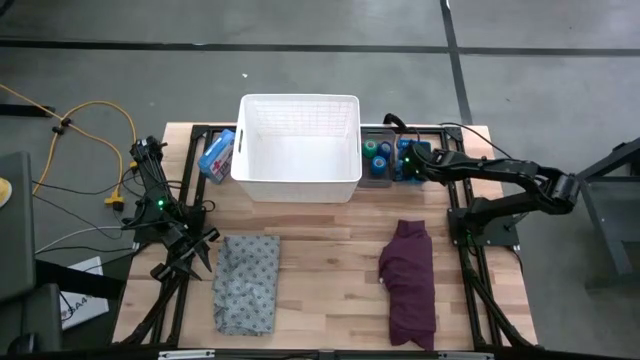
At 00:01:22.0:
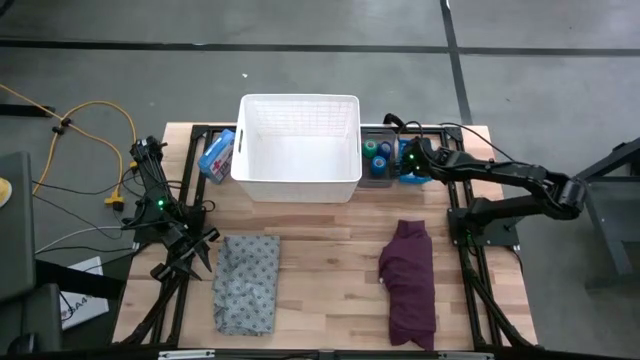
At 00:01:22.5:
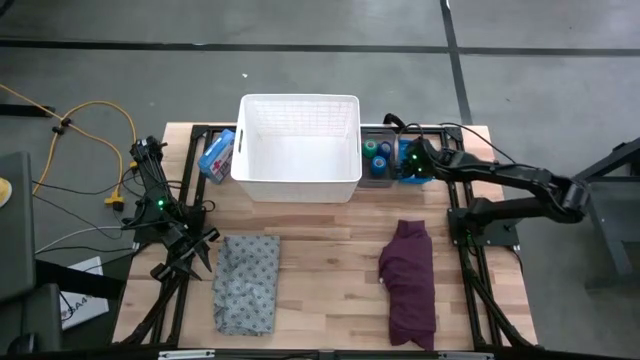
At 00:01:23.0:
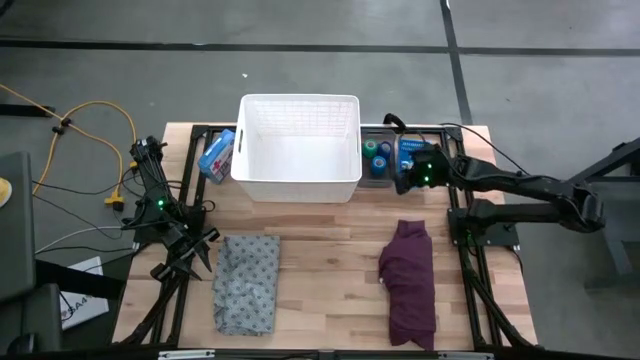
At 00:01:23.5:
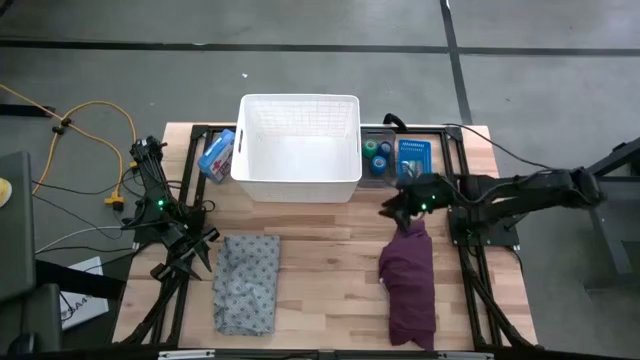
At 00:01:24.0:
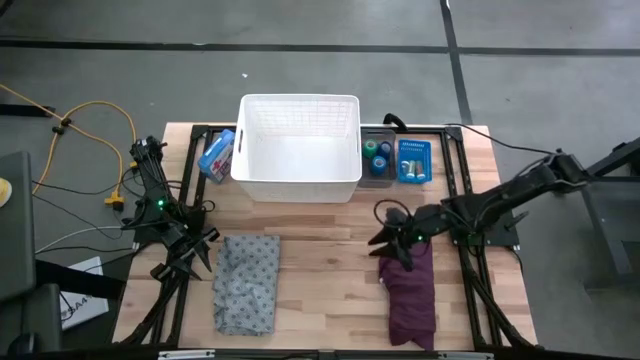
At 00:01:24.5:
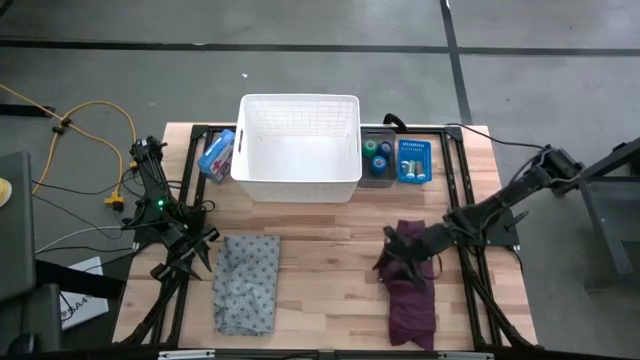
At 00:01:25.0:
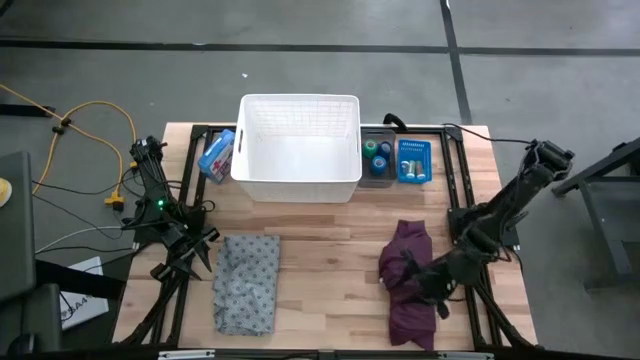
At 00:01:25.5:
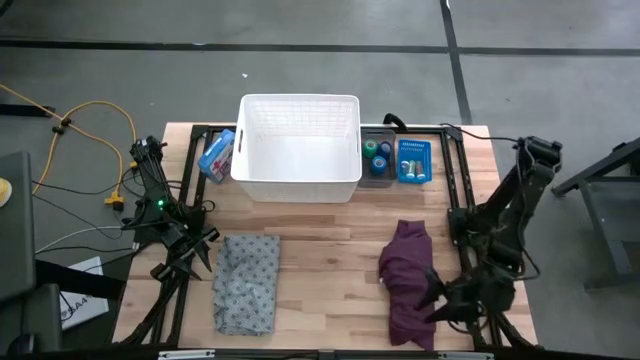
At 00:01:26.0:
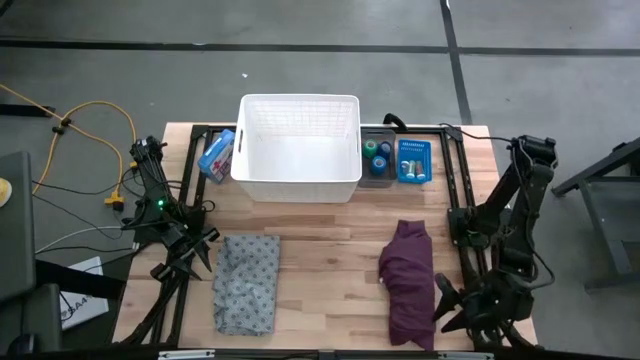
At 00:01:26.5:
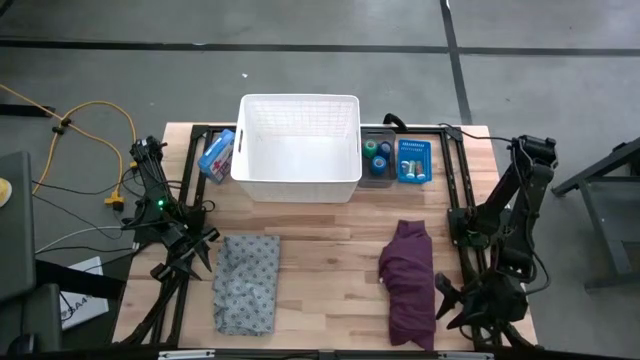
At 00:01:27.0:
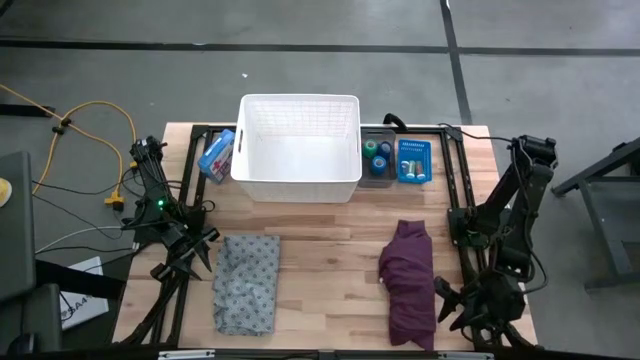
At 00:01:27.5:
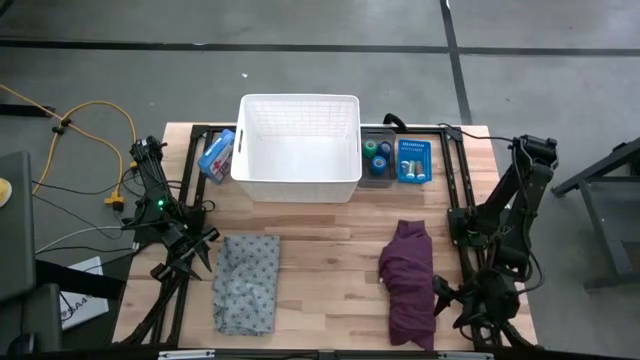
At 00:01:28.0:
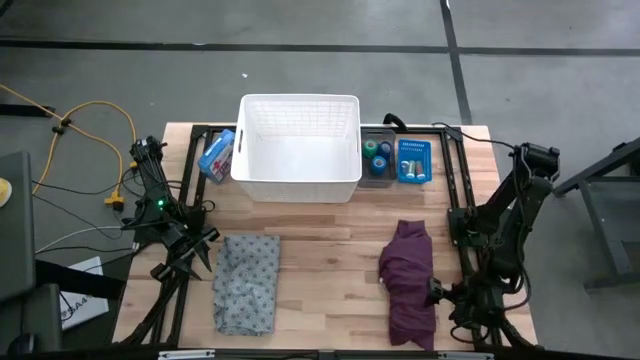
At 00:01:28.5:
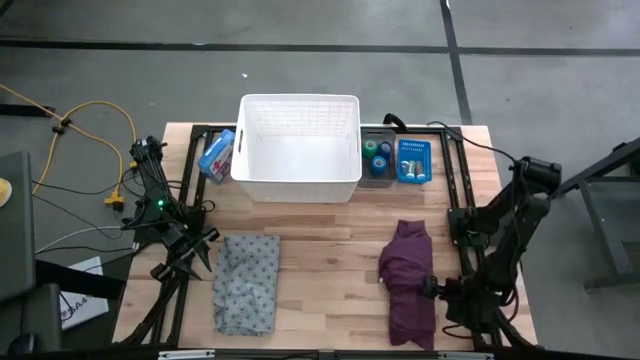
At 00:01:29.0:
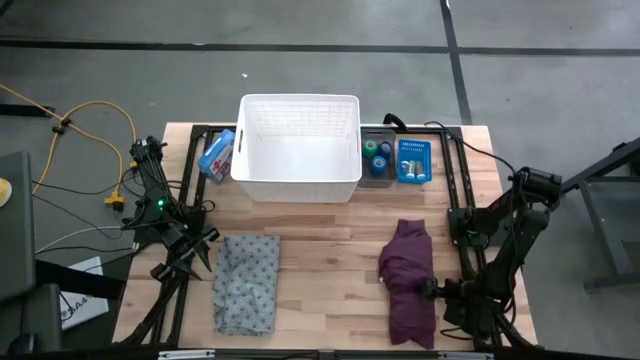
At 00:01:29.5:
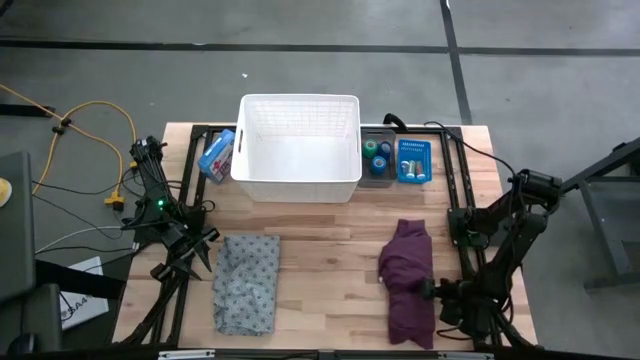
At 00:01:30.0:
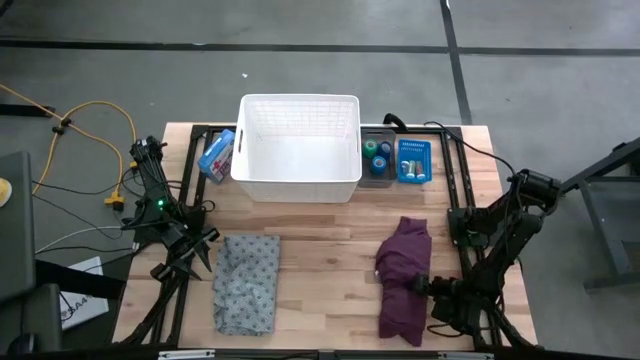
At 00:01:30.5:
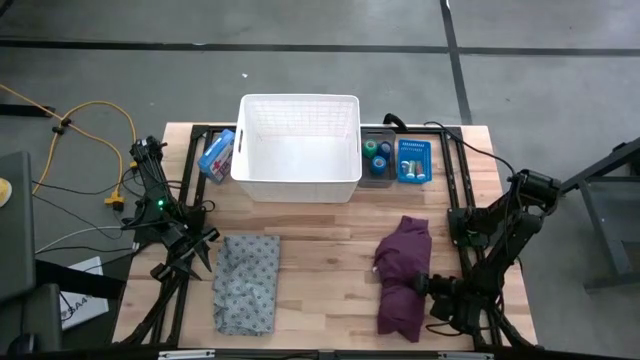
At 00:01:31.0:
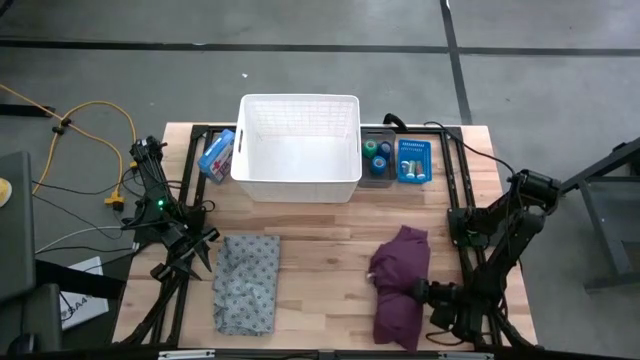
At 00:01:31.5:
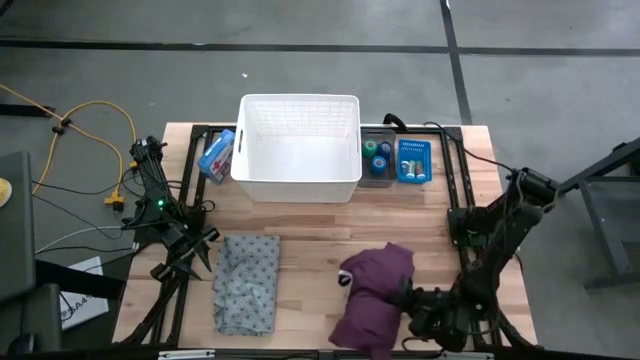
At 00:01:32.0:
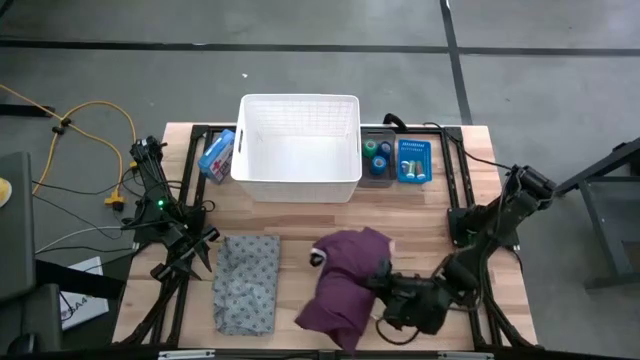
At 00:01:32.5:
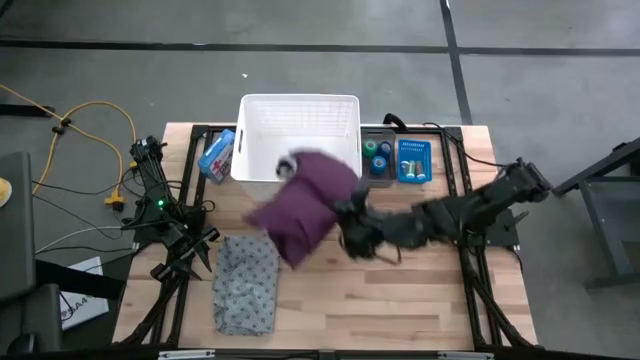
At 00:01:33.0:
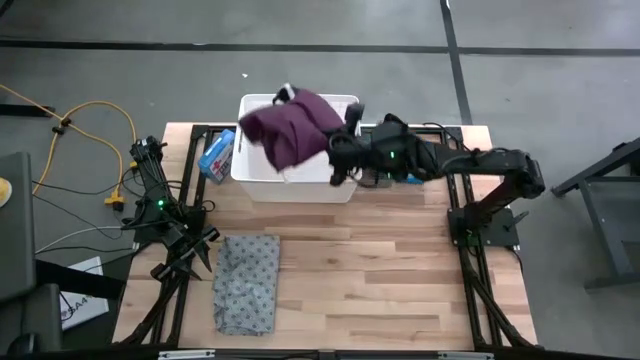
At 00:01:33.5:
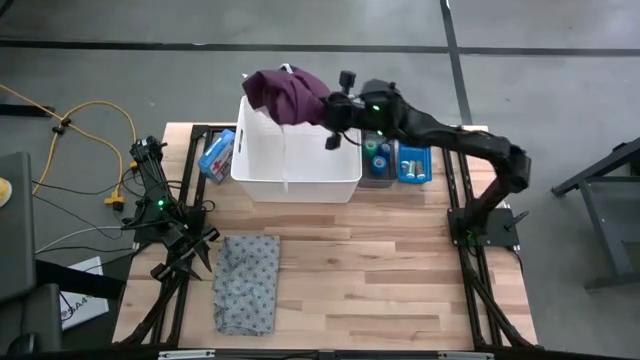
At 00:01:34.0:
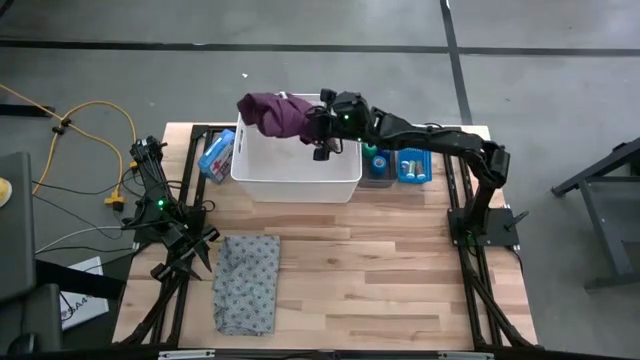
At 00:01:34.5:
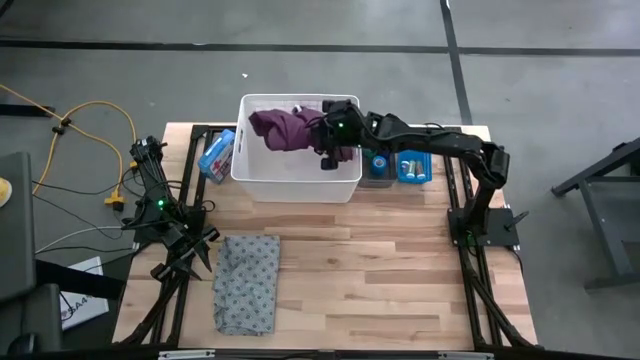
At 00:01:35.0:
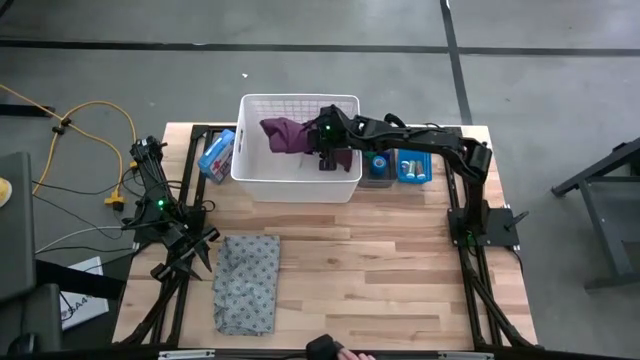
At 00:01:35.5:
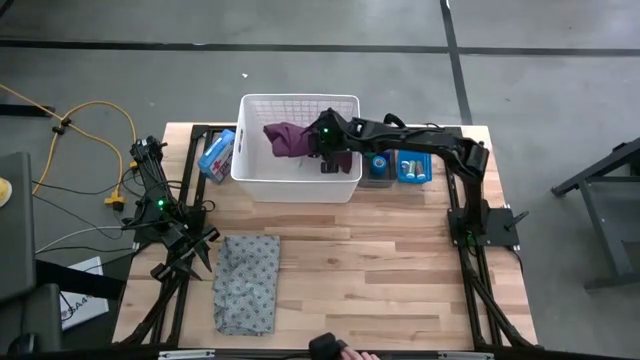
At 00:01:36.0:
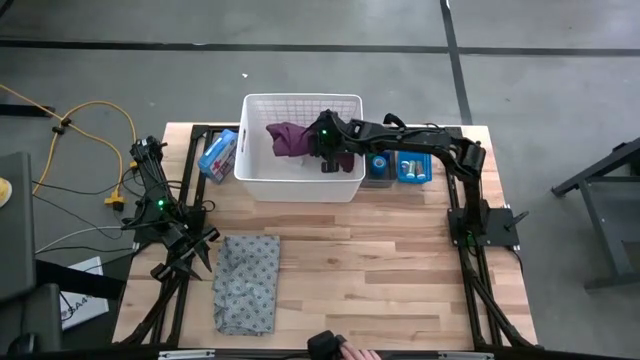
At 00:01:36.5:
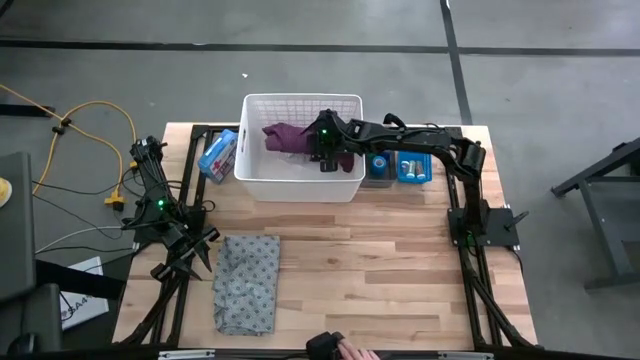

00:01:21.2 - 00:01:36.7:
Task: Pick & Place Medicine items
Put the violet patient gown into the white laundry bin

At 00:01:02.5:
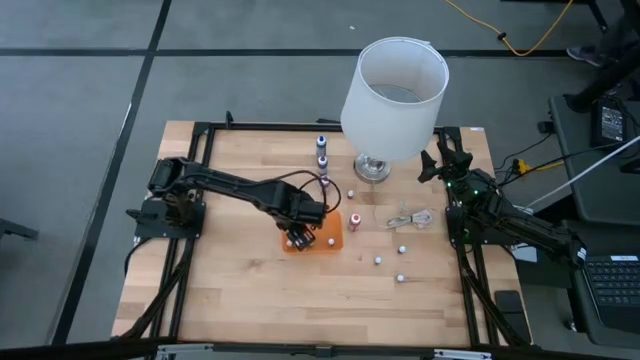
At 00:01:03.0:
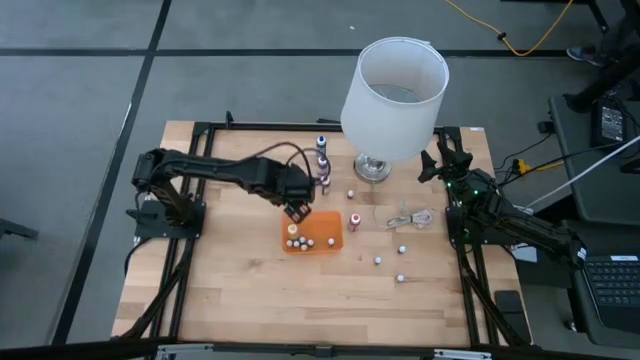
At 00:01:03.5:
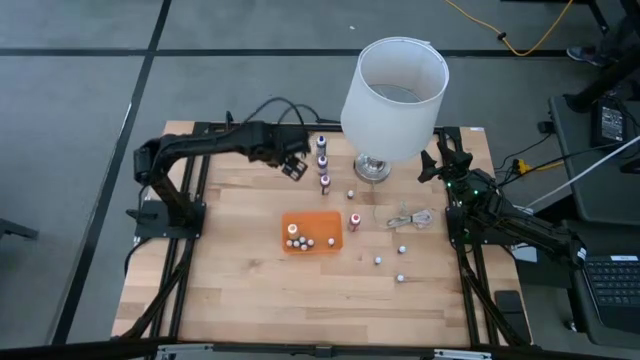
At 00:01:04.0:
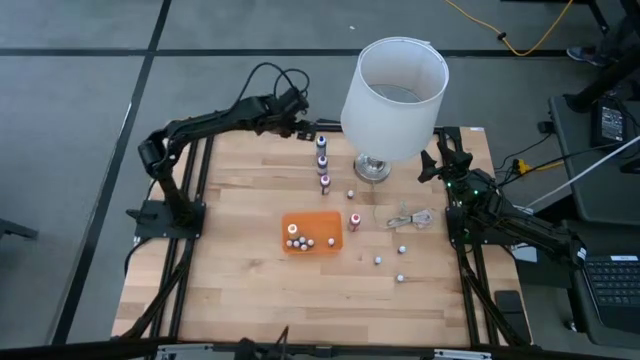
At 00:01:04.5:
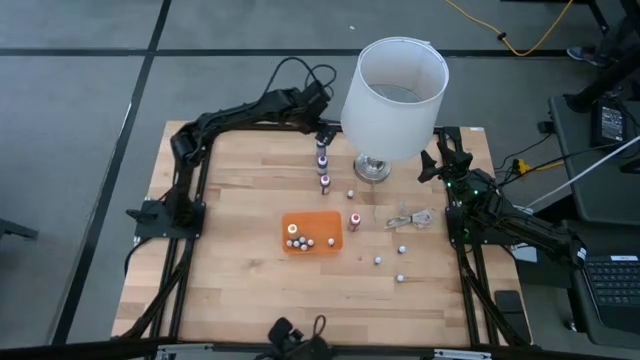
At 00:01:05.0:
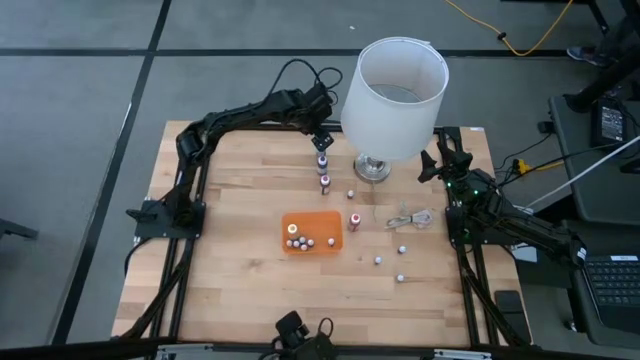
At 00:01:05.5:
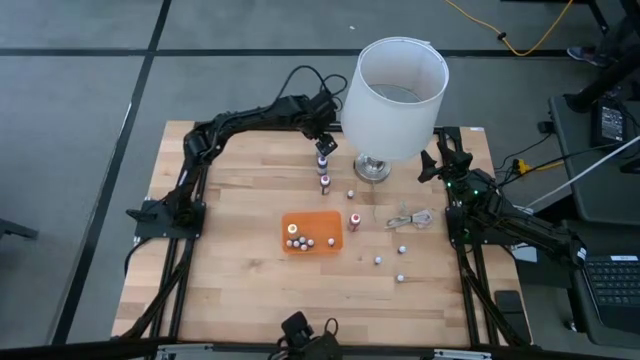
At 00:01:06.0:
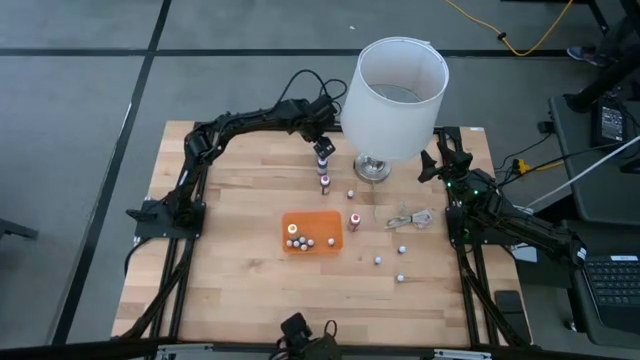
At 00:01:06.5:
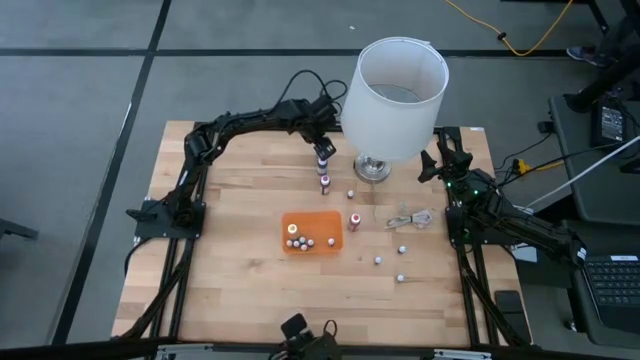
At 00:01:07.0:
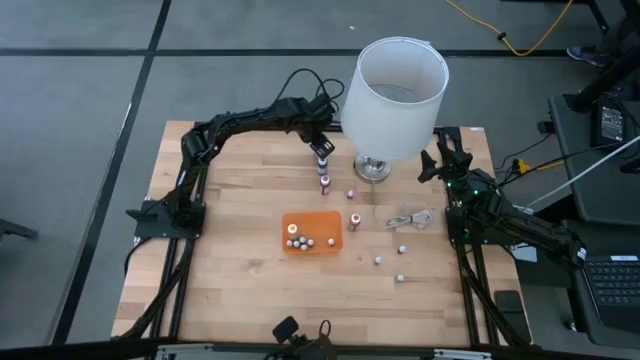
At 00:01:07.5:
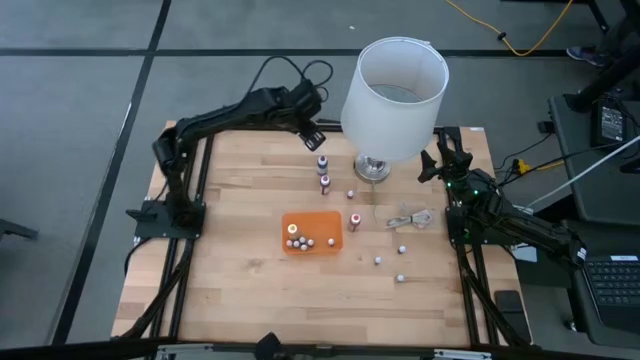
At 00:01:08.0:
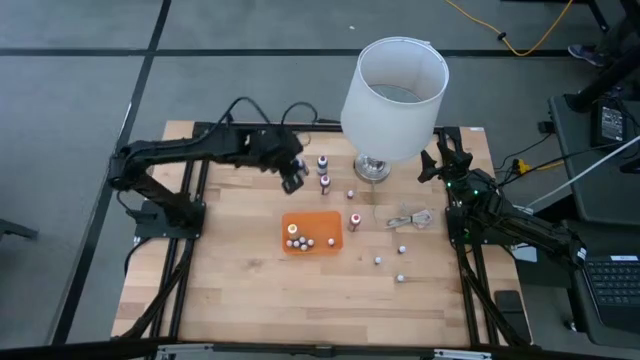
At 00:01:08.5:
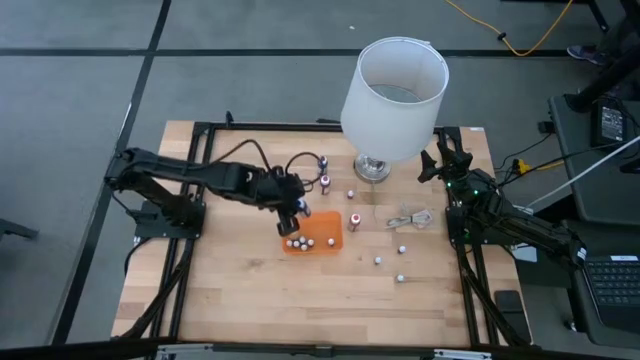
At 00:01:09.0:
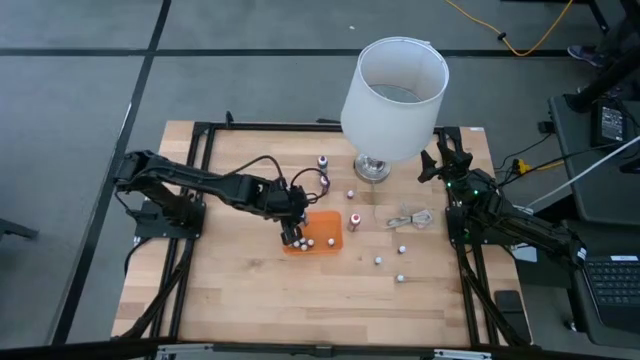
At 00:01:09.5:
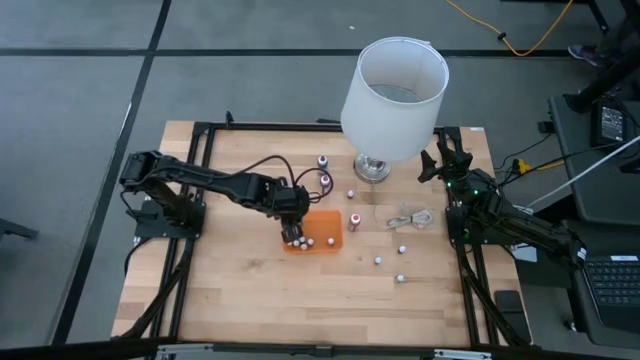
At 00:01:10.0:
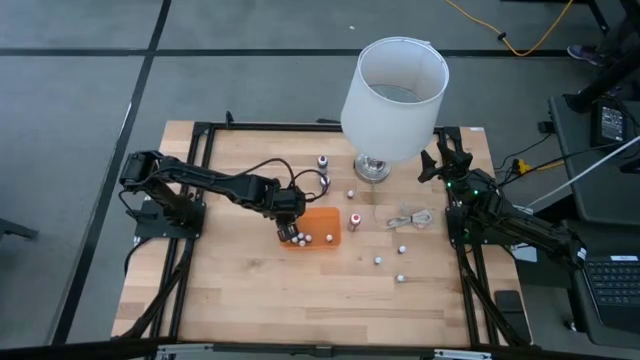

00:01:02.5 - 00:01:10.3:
Task: Pick & Place food coloring
Put the big blue food coloring bottle into the orange transparent bin
